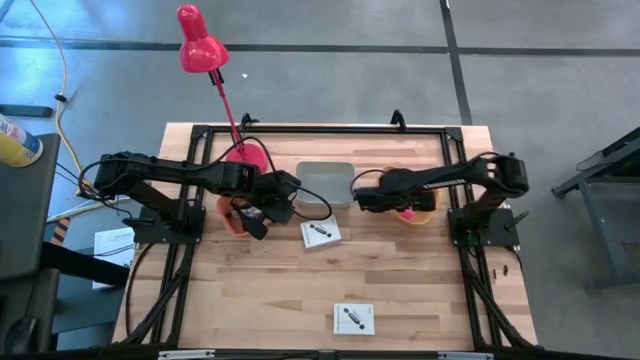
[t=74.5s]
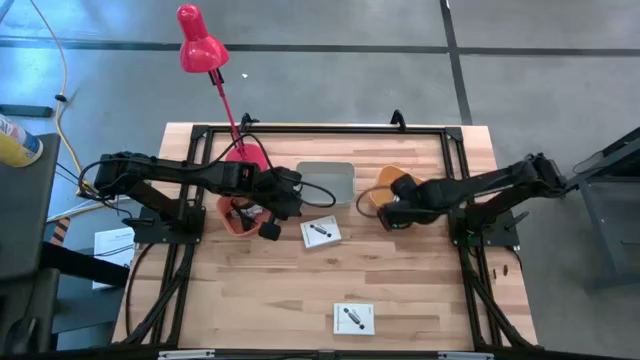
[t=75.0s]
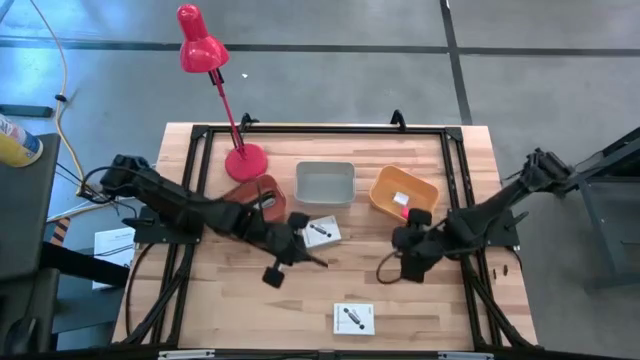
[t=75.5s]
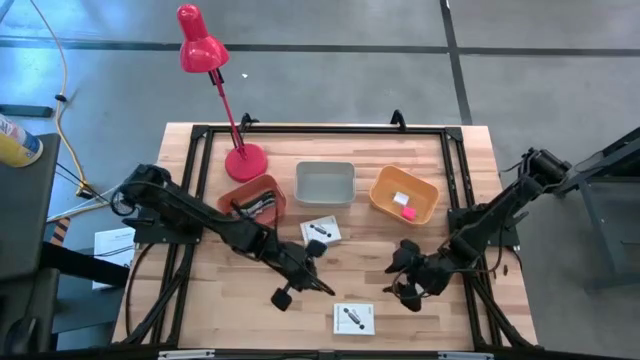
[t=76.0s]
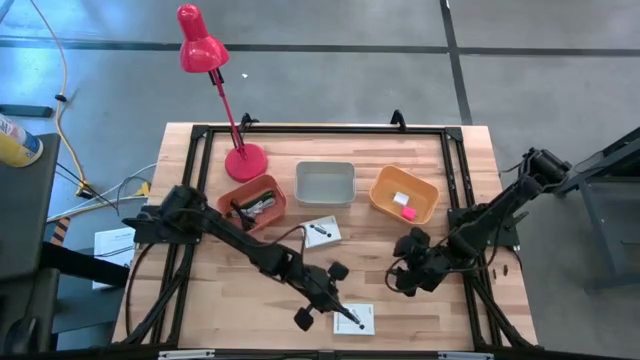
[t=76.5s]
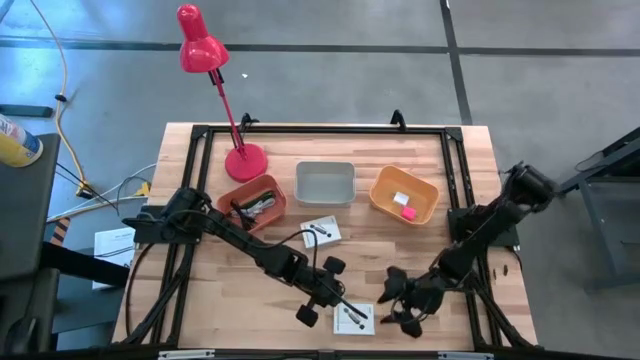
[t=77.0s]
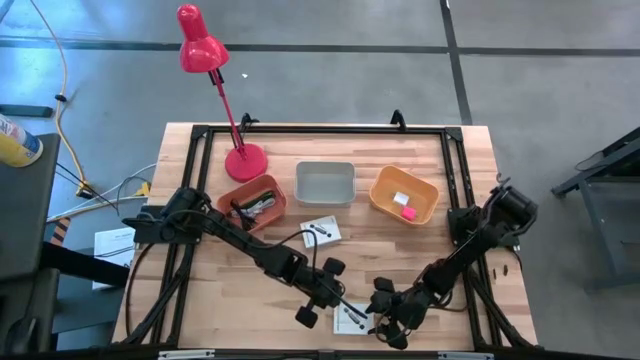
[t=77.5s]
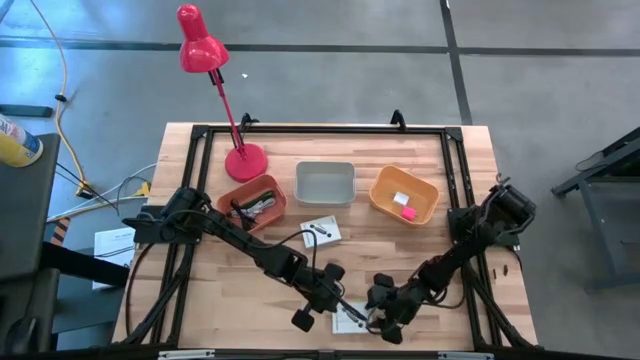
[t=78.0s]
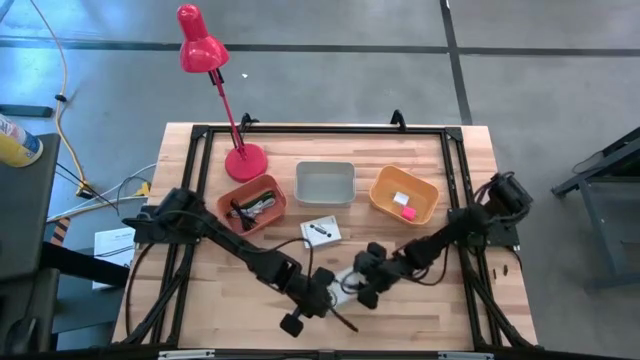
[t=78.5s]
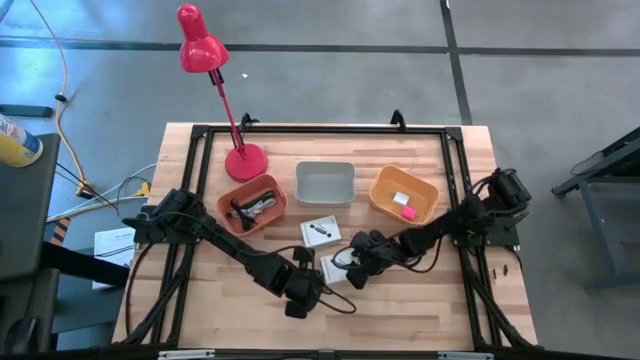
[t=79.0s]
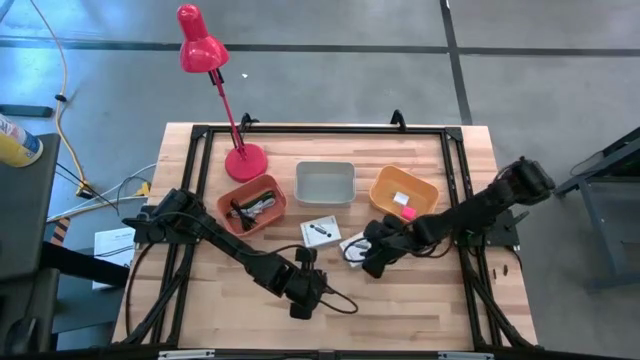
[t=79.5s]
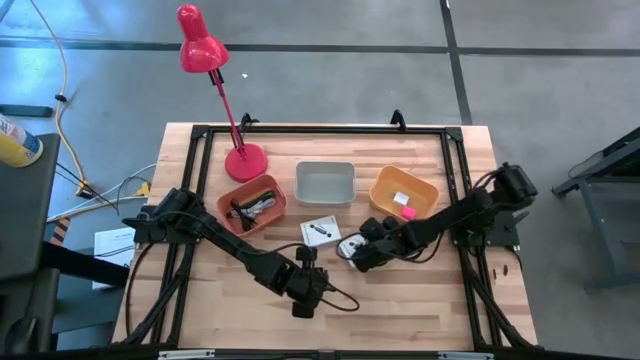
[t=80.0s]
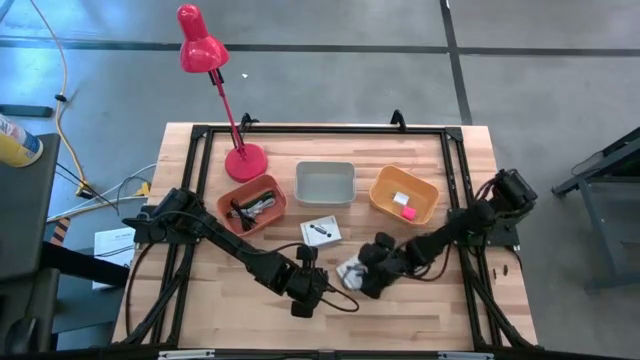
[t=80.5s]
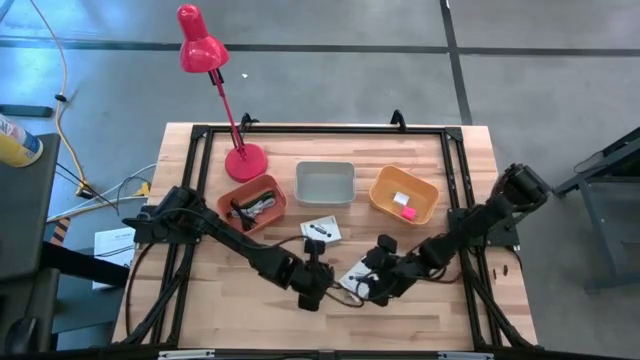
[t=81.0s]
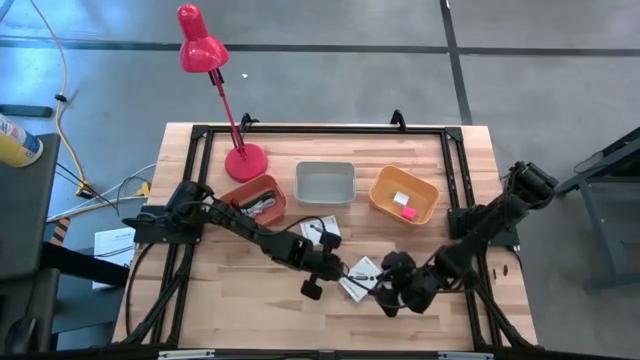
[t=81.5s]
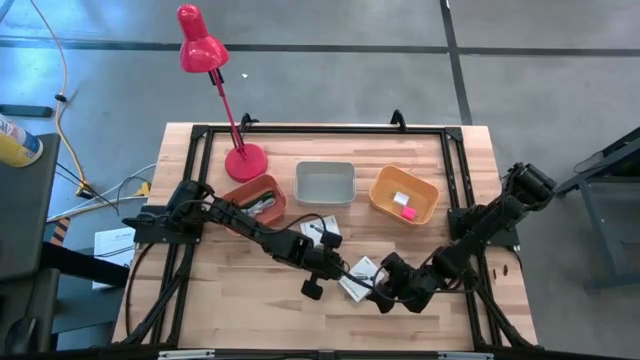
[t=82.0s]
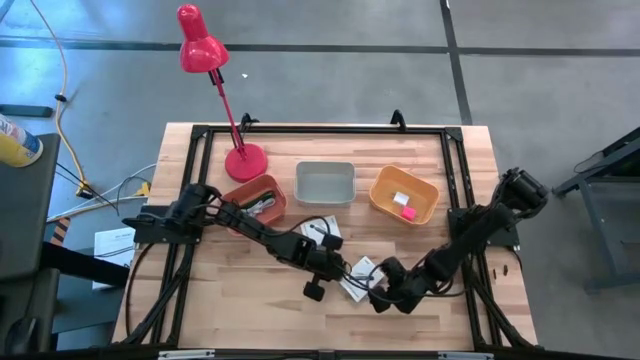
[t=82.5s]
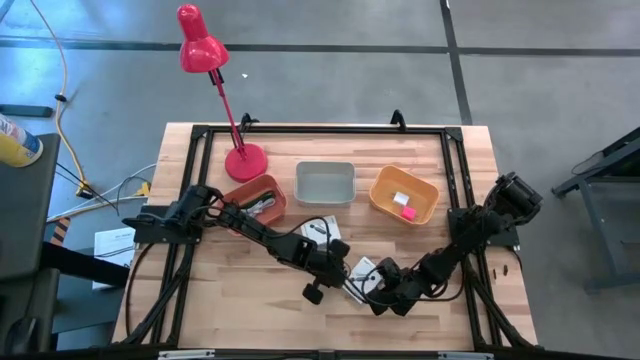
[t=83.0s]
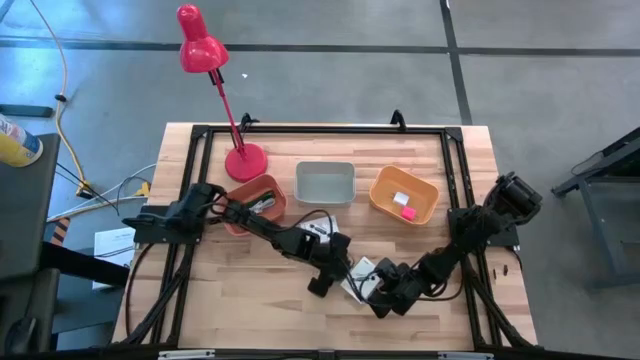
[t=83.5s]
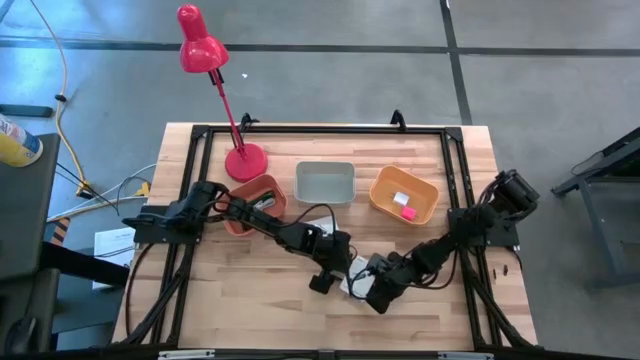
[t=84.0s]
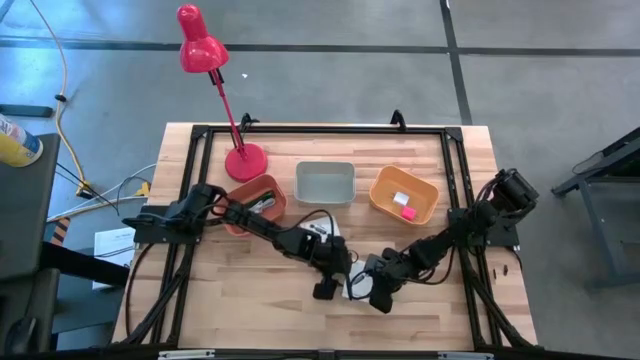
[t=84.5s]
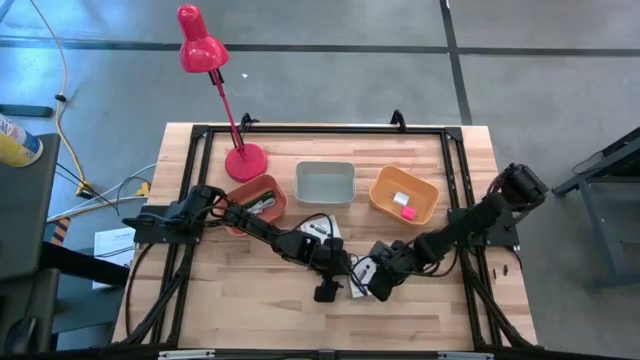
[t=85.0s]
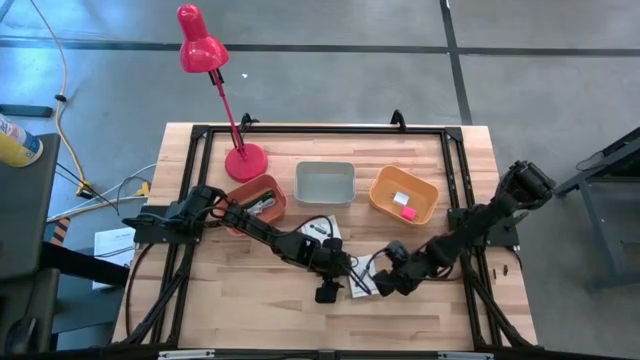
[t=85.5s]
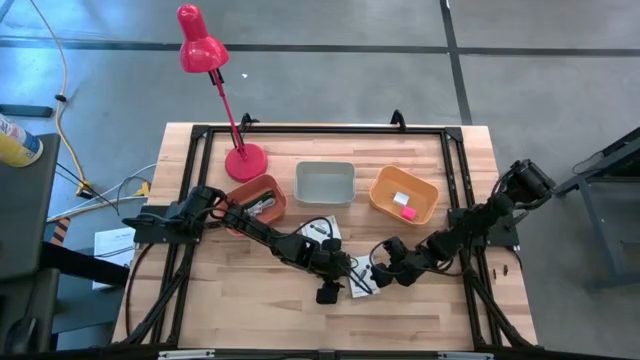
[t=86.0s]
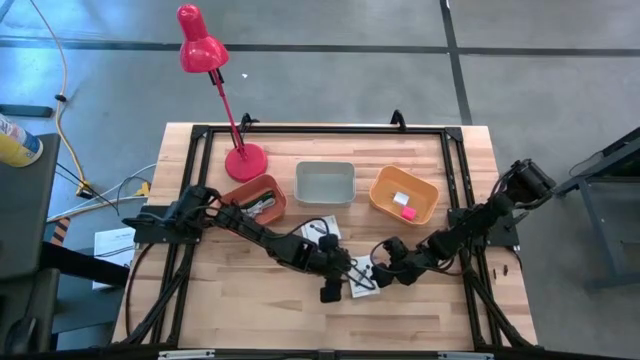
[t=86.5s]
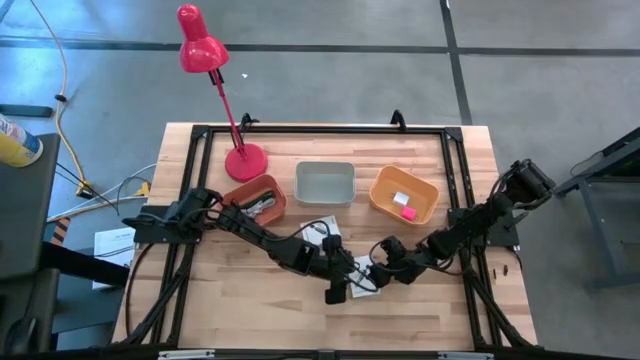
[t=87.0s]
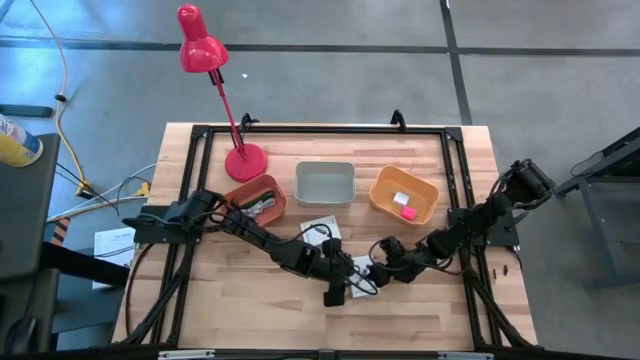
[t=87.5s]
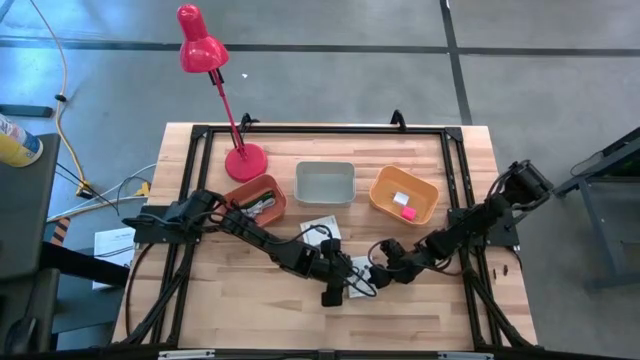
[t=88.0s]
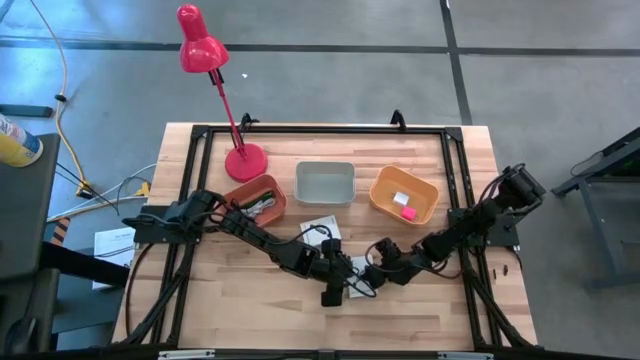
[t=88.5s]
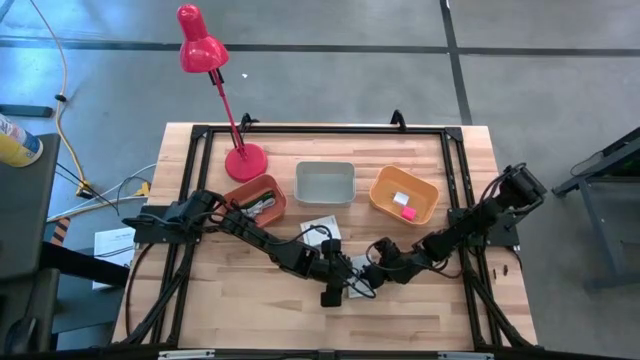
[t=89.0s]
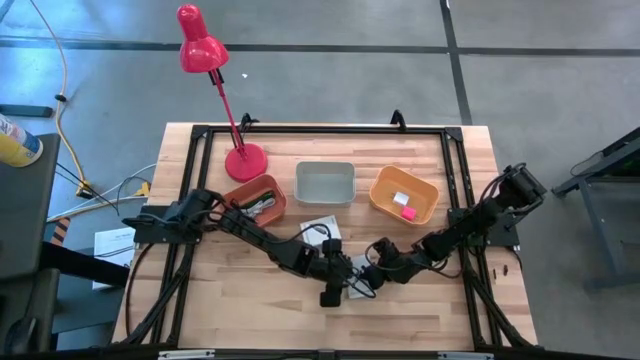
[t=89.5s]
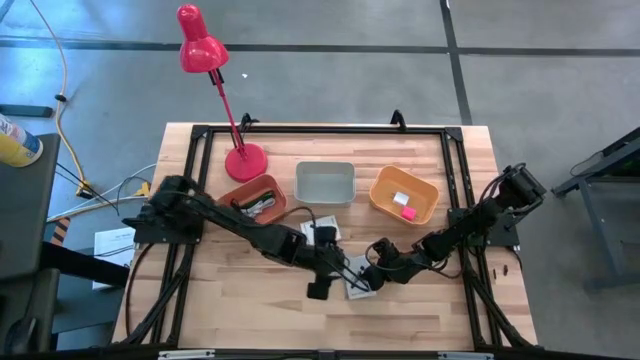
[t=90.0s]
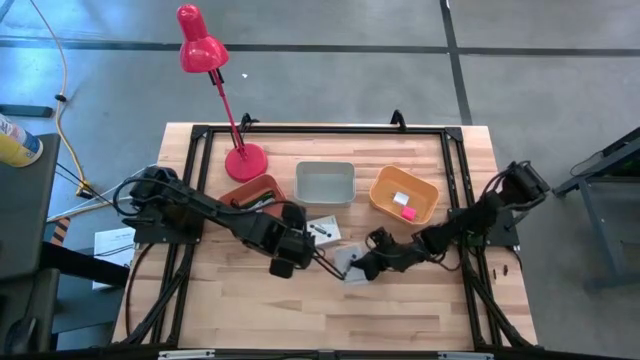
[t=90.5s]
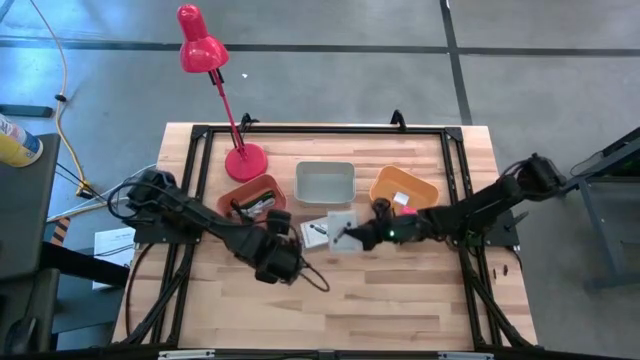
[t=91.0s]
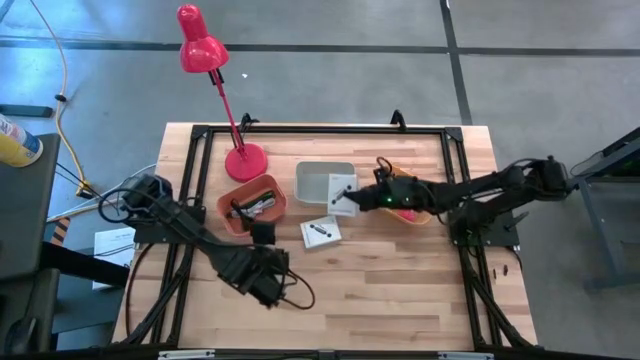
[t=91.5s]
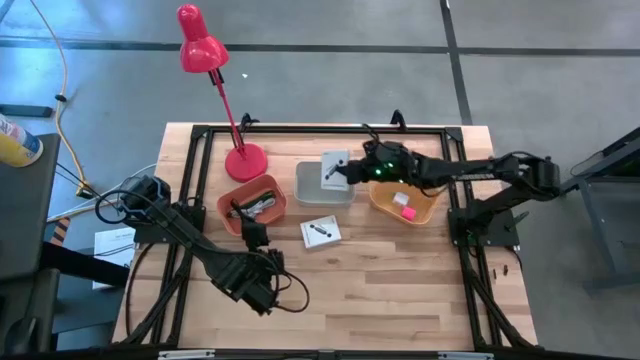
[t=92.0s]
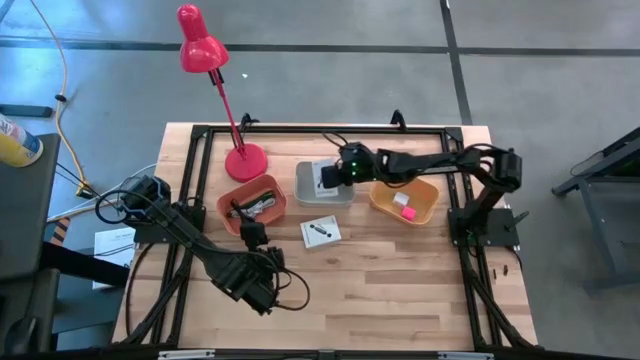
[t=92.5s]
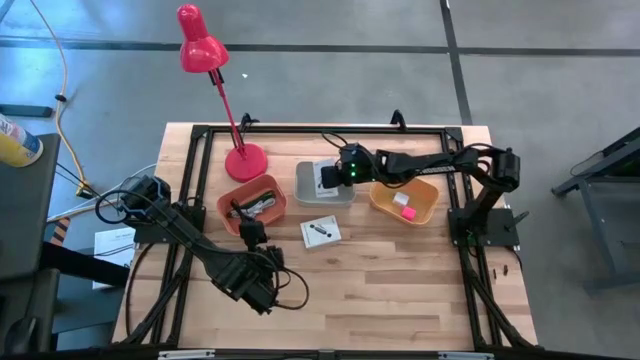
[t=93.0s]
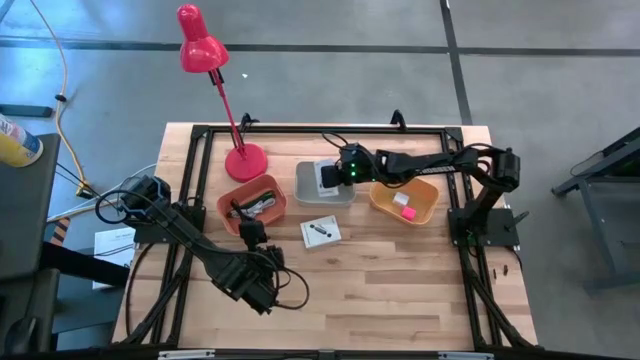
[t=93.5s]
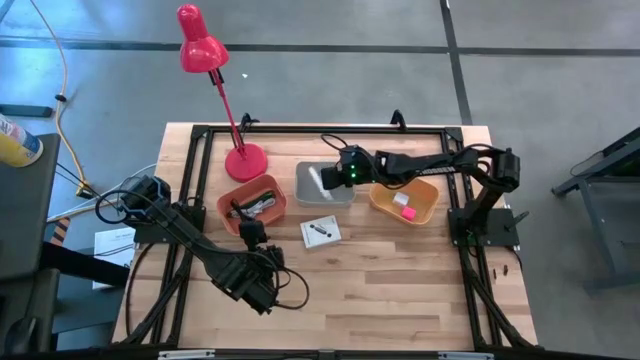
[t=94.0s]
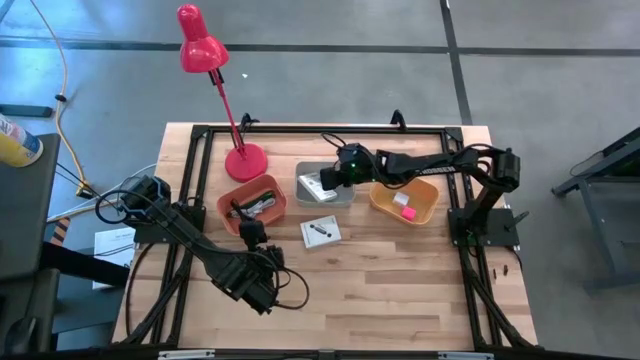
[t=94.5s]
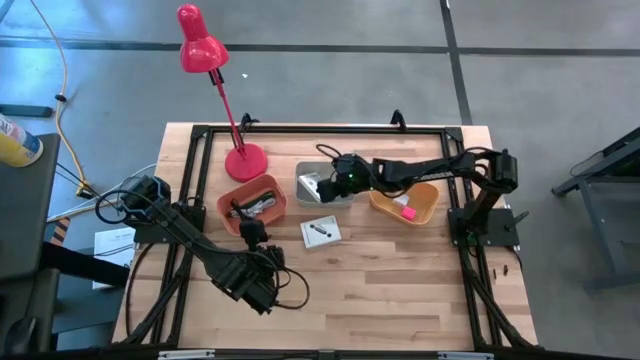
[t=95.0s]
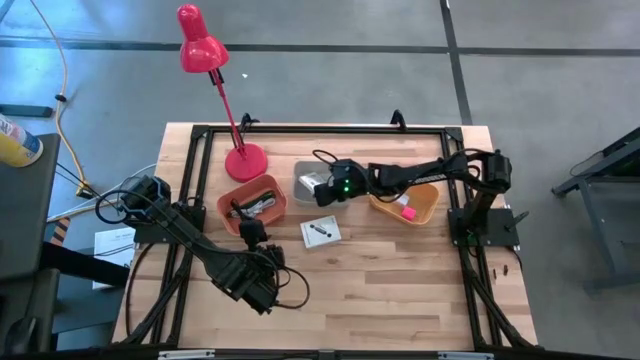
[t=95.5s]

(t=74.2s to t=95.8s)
Task: Pick and place items into bin
Put the bottom white card reader box into the gray bin
